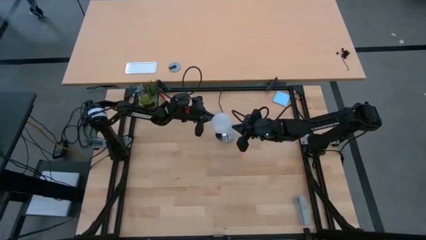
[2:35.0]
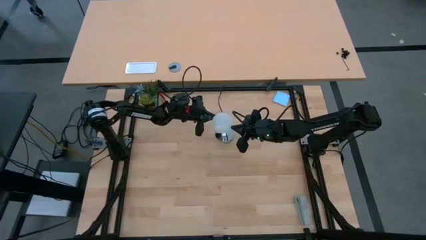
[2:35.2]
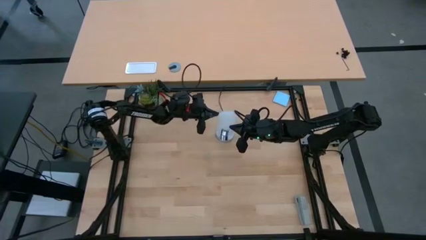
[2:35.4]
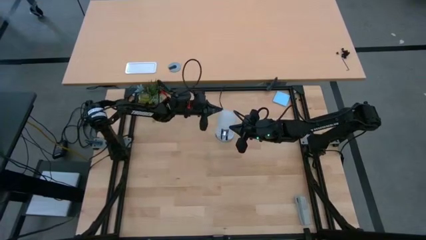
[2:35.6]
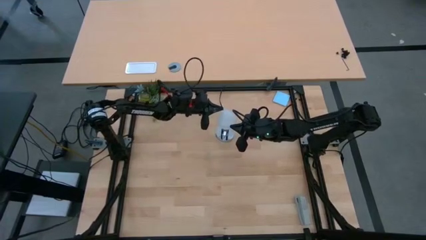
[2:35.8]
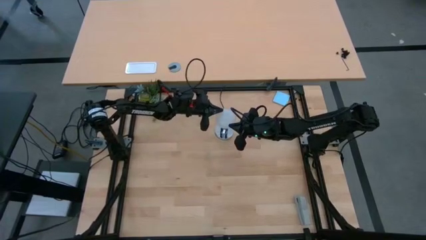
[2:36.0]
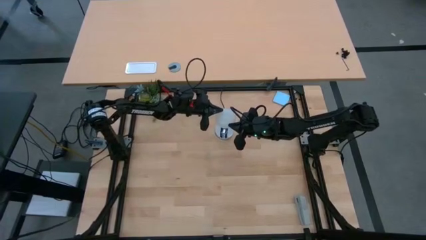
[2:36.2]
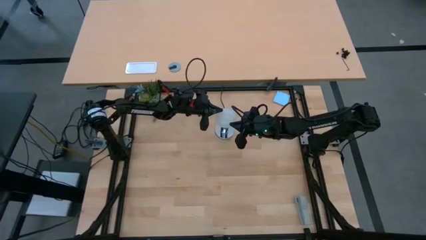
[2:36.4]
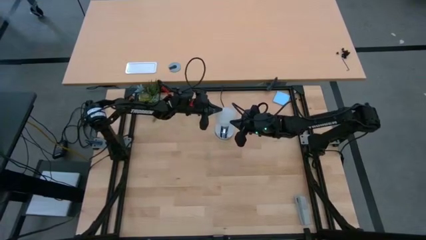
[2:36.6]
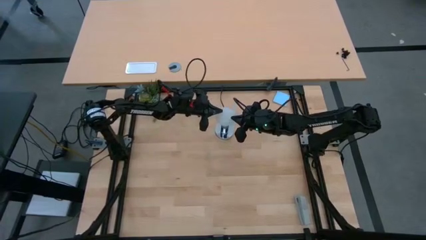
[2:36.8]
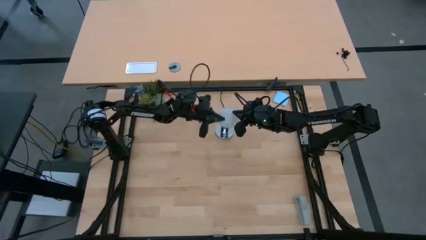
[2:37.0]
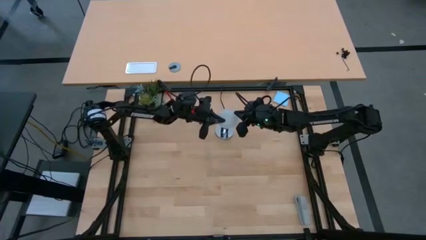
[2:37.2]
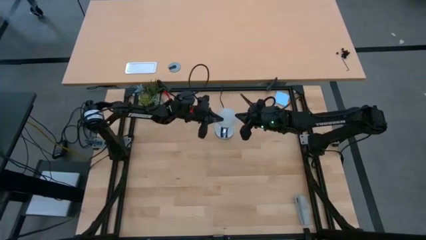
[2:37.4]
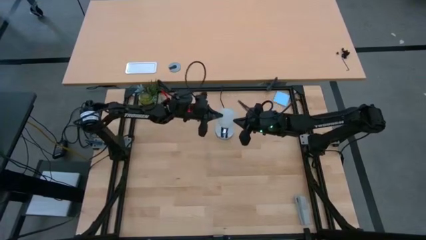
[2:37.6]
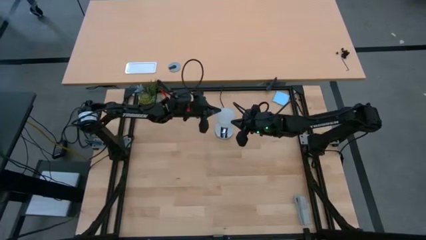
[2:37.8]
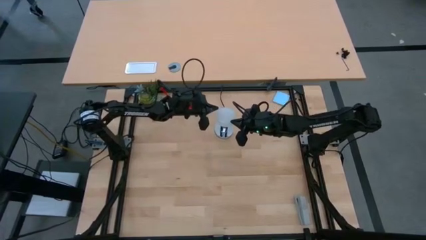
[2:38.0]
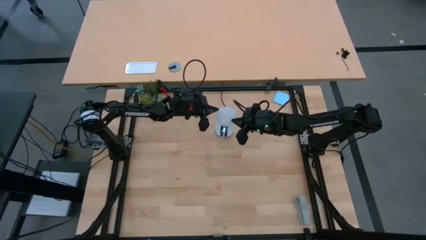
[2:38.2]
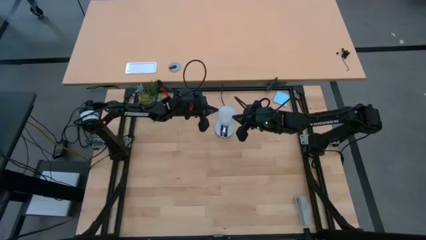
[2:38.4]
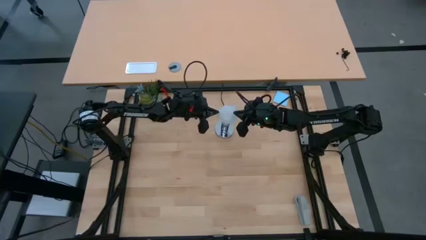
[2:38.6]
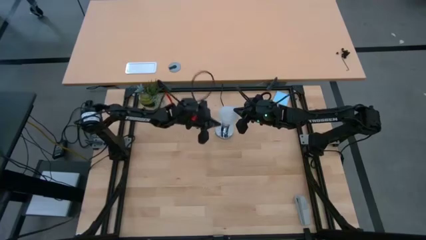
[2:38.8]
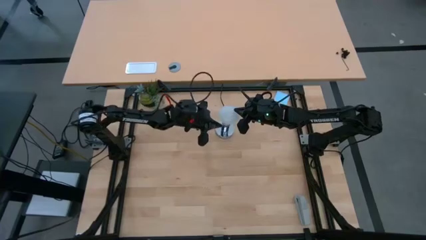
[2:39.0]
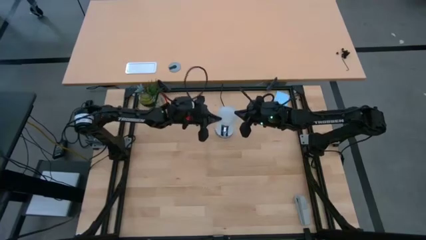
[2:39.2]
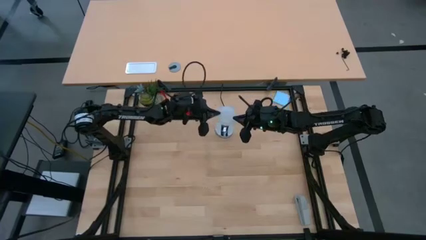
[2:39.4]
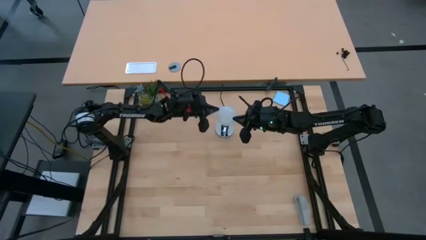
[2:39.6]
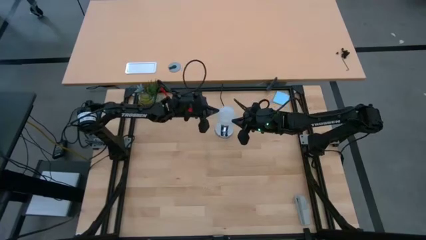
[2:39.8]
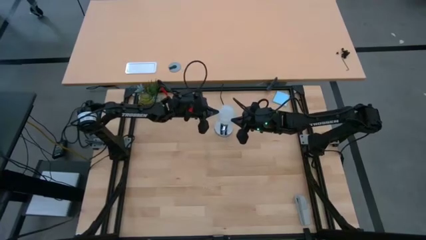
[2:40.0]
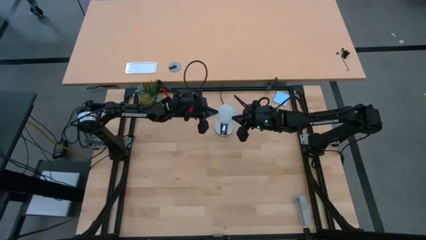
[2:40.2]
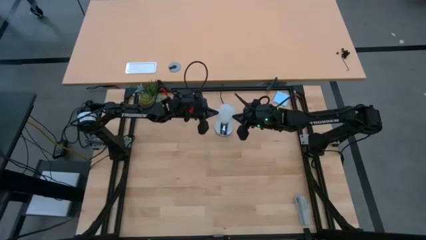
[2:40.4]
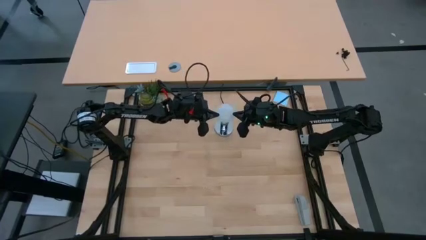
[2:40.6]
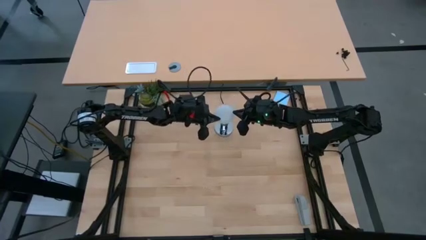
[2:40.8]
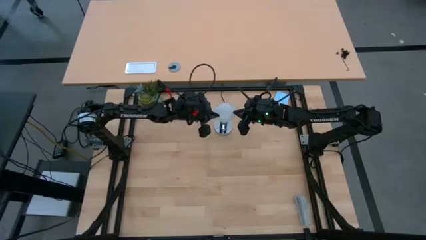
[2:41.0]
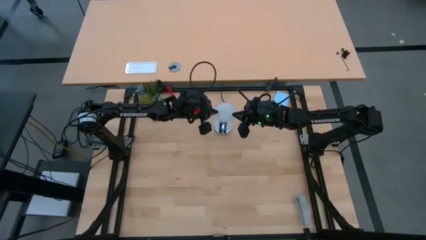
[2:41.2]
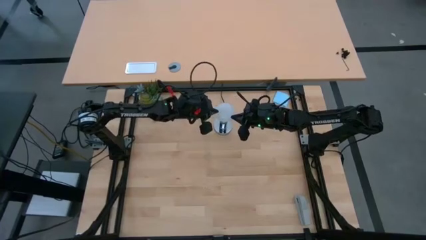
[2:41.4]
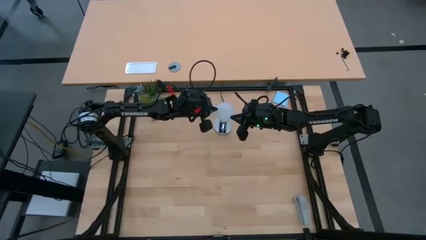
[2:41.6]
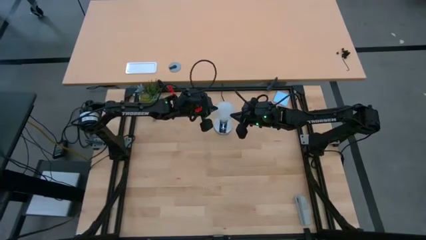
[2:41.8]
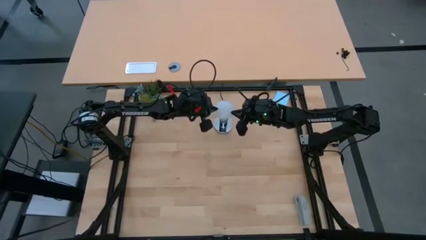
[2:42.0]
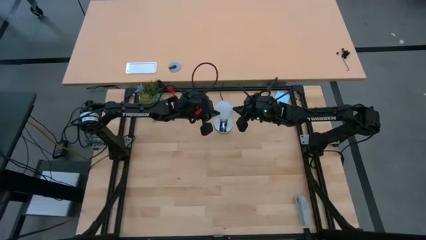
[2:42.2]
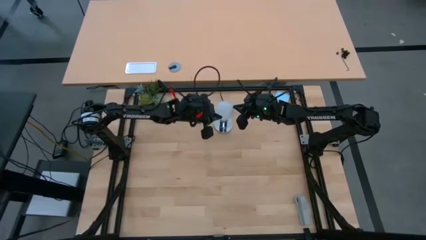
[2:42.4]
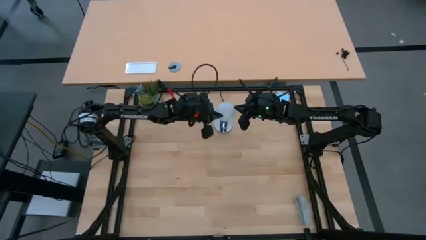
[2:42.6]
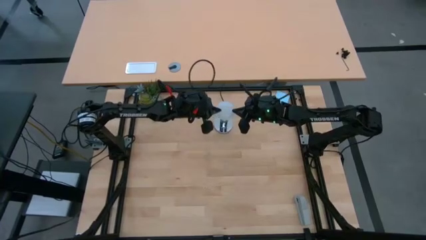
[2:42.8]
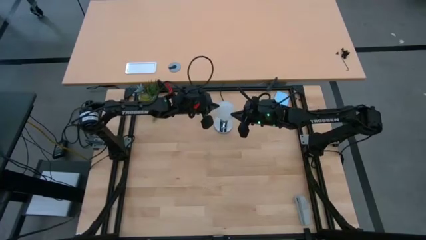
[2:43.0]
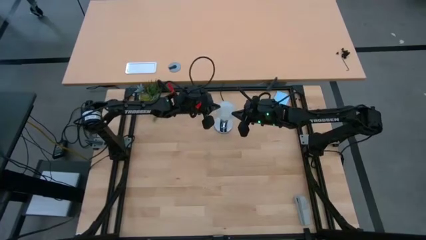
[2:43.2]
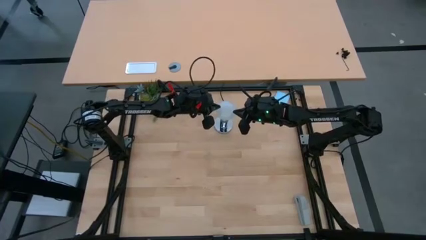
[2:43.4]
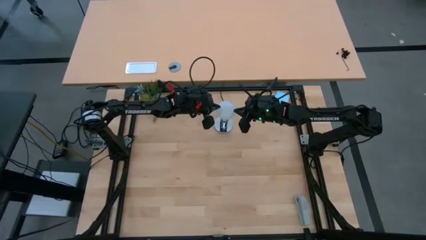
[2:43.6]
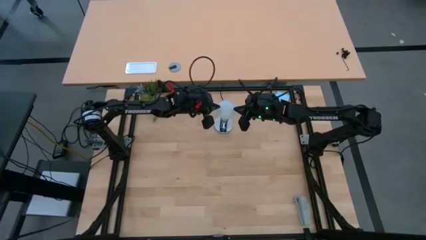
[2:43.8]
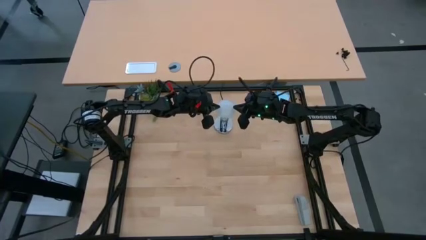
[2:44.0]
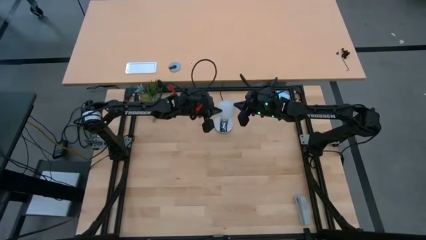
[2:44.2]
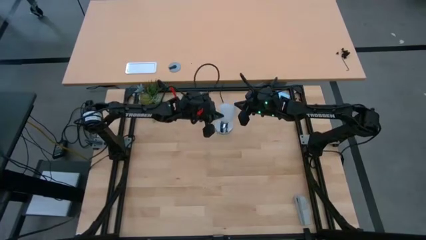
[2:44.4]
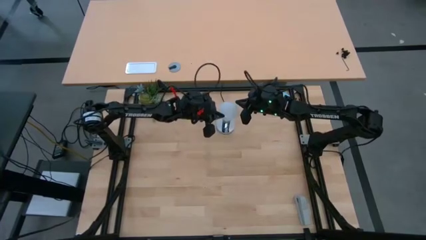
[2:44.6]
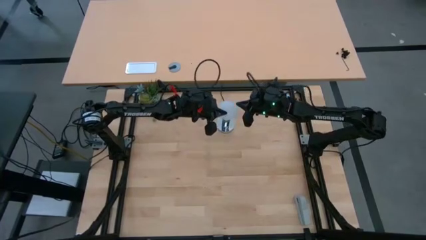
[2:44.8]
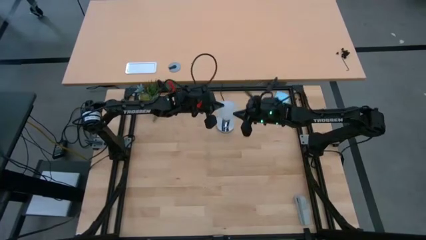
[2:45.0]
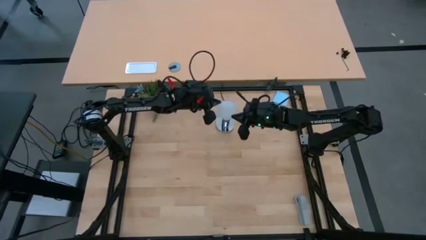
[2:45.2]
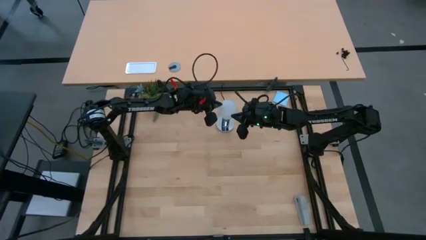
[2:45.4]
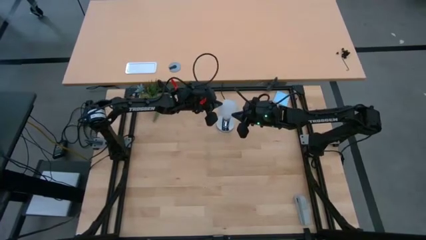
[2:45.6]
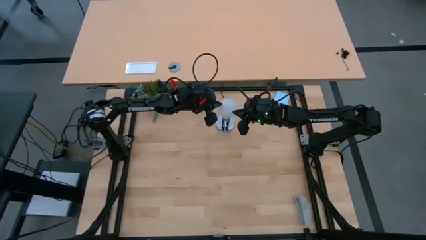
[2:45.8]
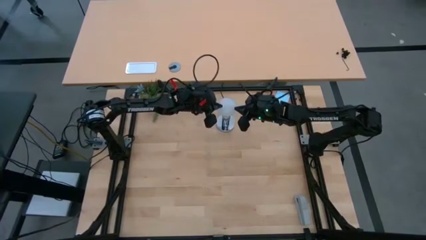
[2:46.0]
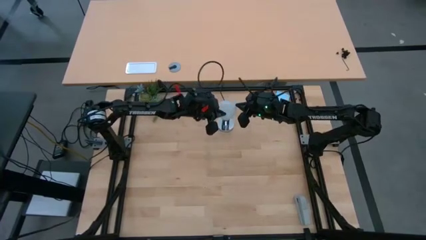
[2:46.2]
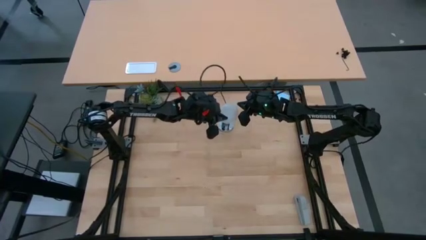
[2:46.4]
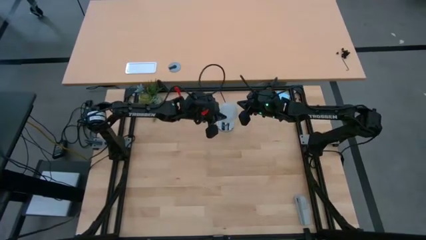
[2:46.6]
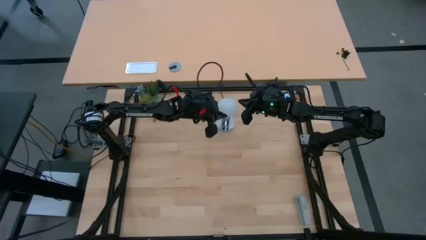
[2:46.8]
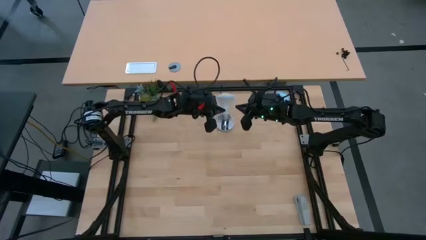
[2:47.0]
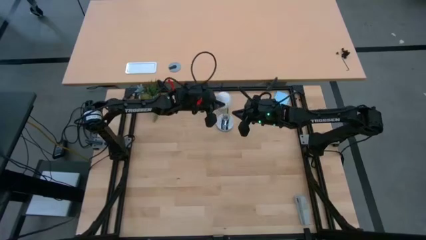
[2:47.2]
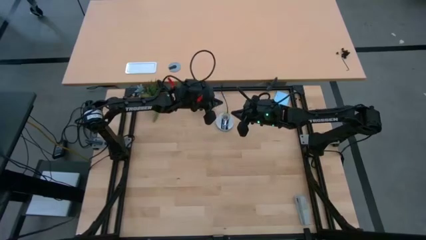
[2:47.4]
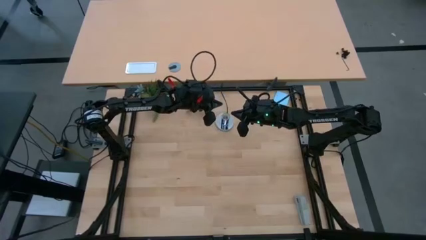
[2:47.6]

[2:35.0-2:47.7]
Task: Screw lightbulb
Remove the white lightbulb from the desk lamp

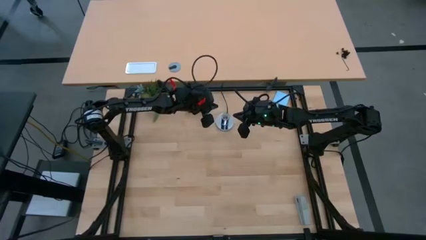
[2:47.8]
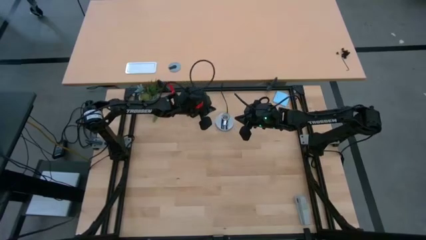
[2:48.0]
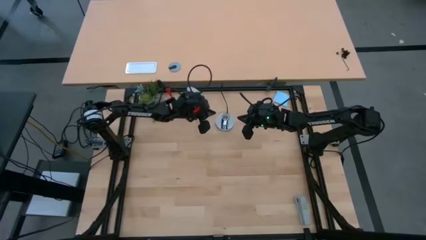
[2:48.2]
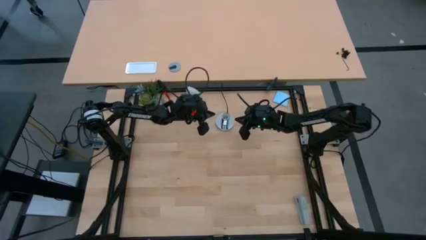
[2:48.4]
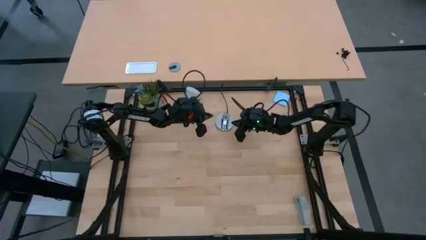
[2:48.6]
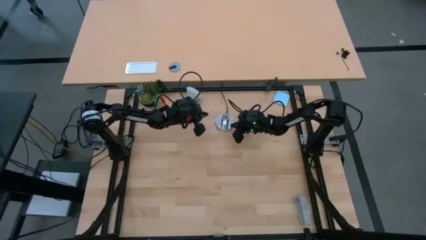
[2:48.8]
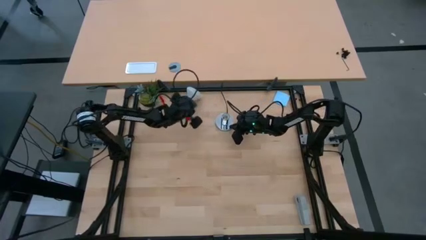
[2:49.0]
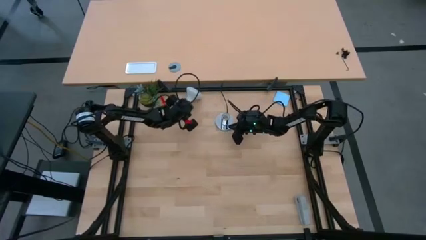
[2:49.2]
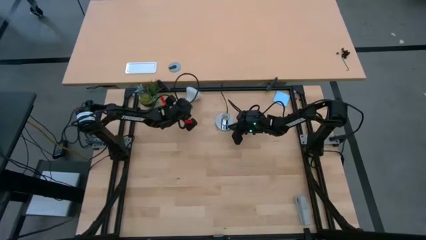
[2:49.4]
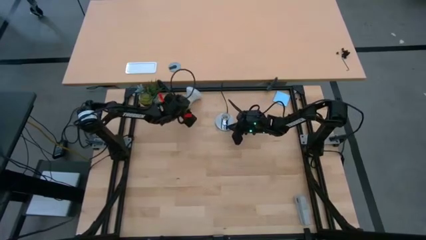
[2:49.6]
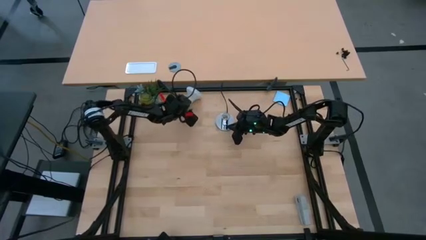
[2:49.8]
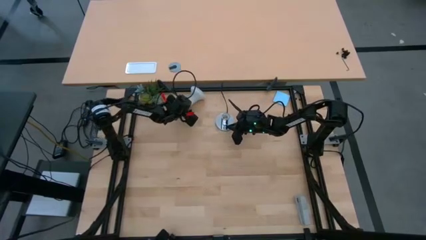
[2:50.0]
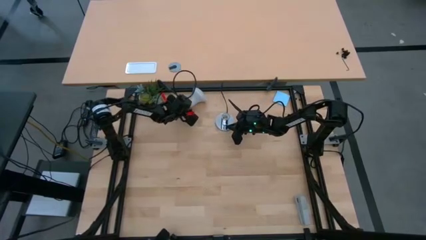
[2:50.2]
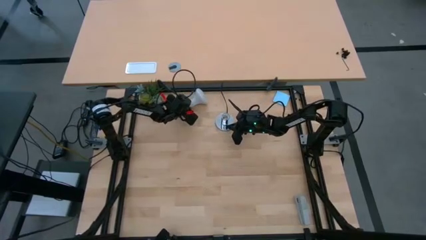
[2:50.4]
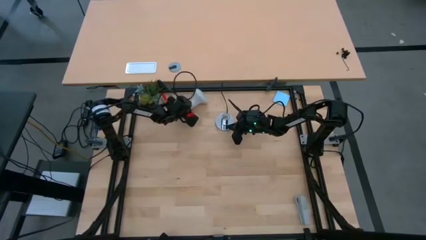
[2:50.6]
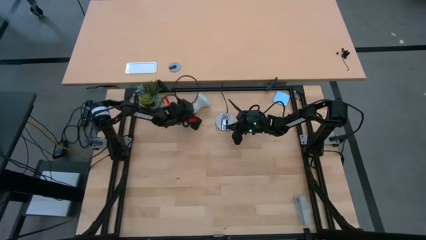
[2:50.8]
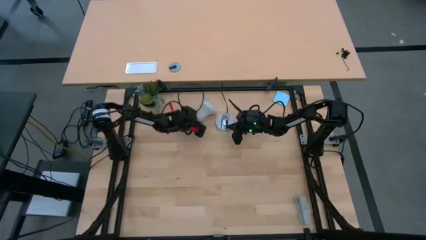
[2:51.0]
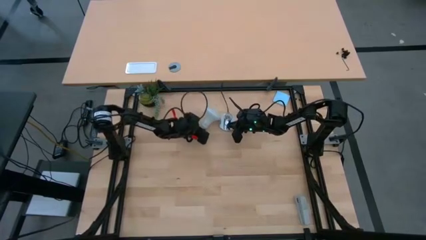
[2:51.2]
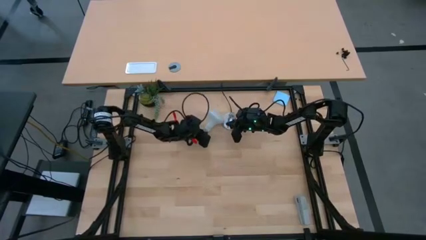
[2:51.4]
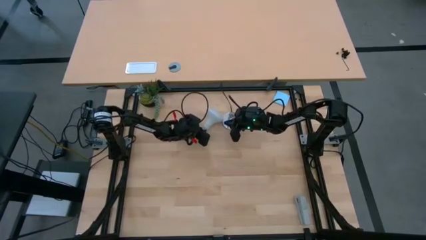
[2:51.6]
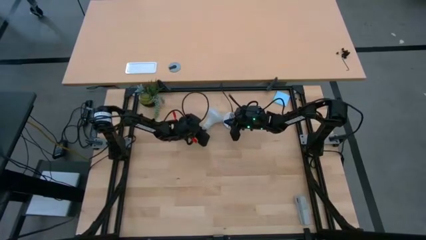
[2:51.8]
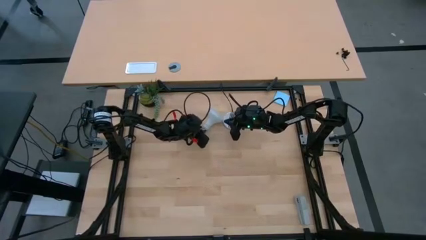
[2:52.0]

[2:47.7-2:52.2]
Move the white lightbulb to the top center of the table
